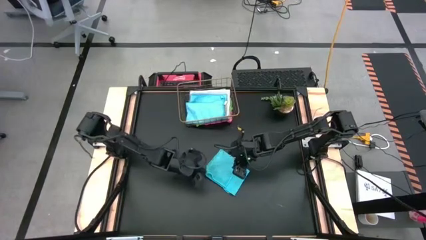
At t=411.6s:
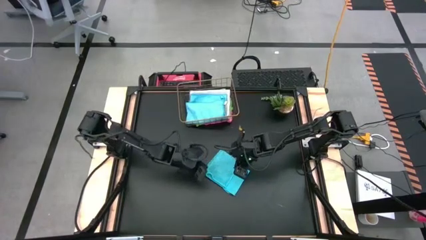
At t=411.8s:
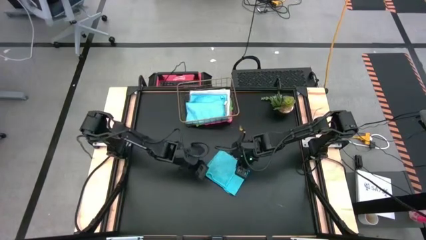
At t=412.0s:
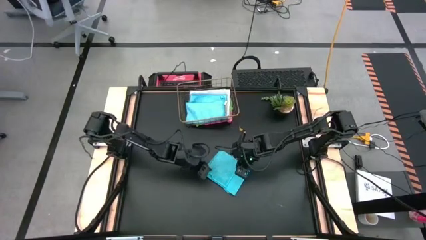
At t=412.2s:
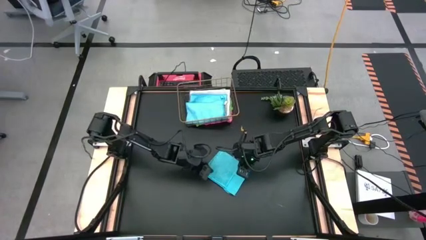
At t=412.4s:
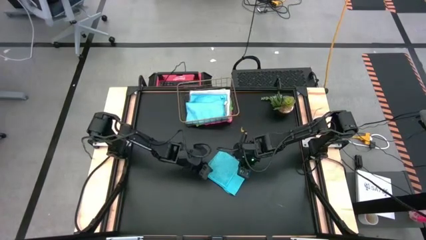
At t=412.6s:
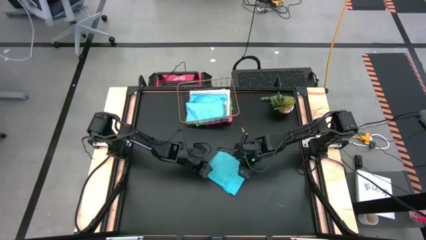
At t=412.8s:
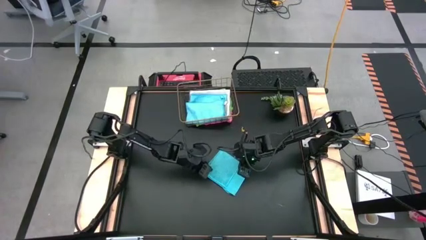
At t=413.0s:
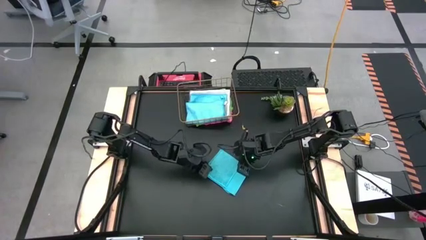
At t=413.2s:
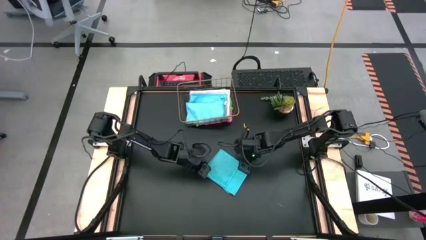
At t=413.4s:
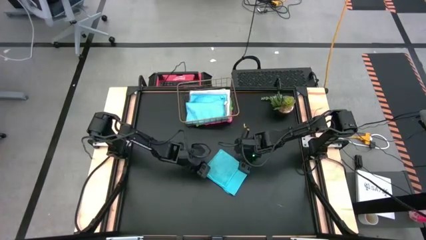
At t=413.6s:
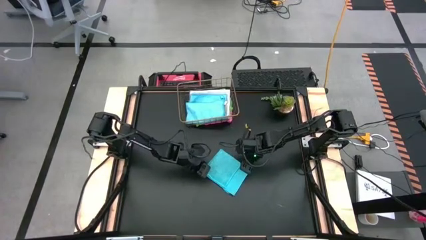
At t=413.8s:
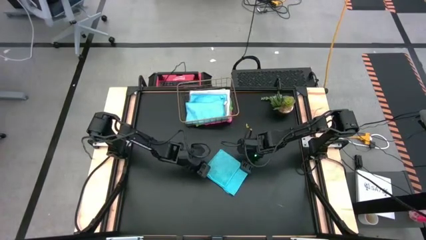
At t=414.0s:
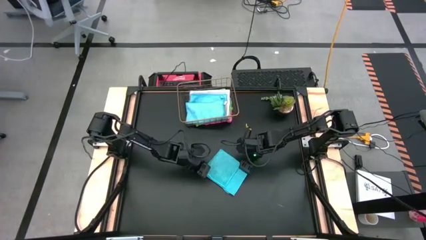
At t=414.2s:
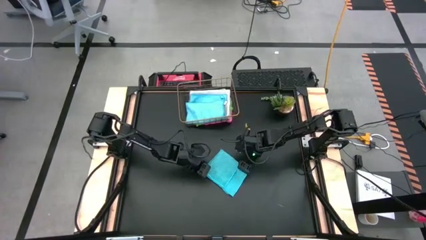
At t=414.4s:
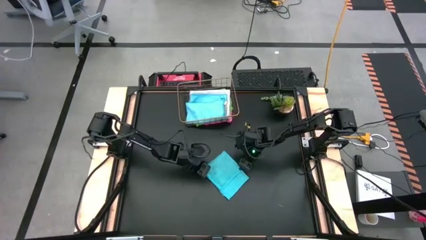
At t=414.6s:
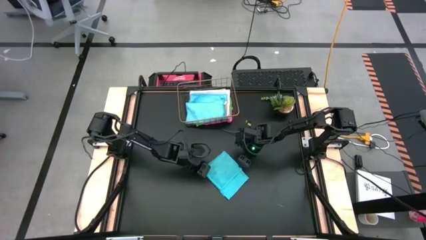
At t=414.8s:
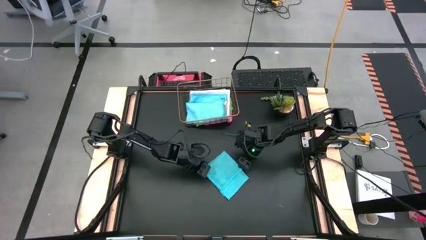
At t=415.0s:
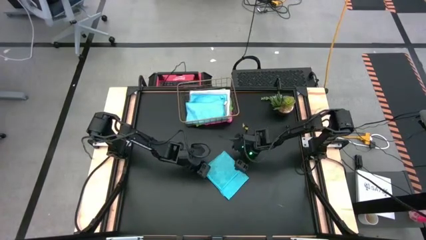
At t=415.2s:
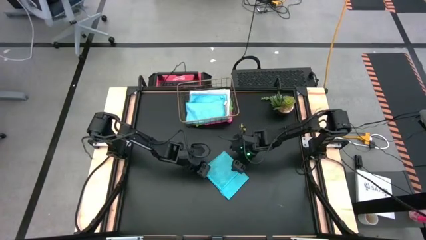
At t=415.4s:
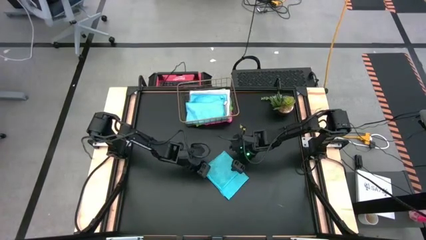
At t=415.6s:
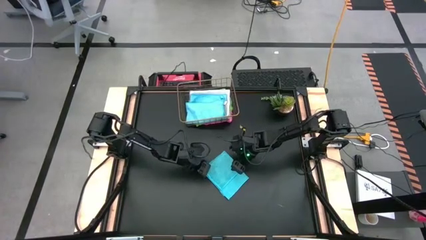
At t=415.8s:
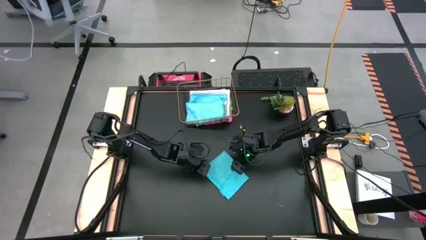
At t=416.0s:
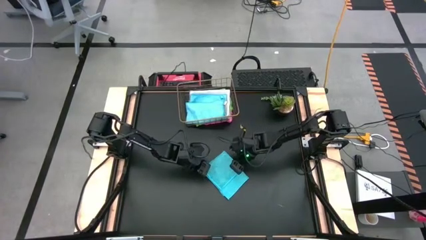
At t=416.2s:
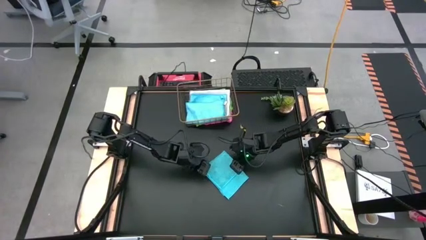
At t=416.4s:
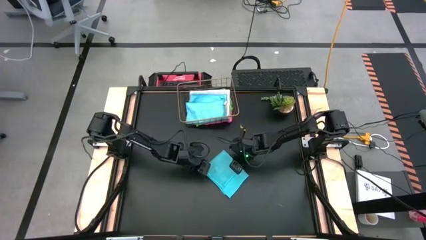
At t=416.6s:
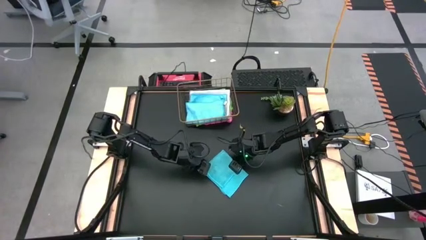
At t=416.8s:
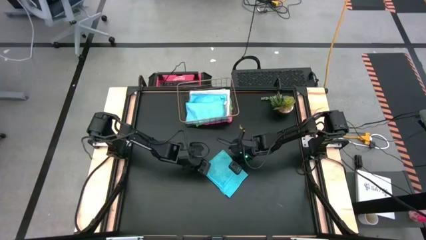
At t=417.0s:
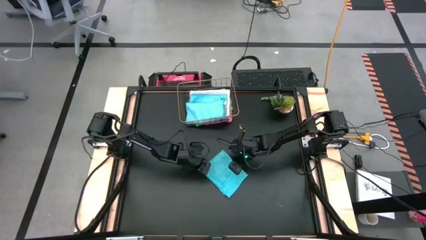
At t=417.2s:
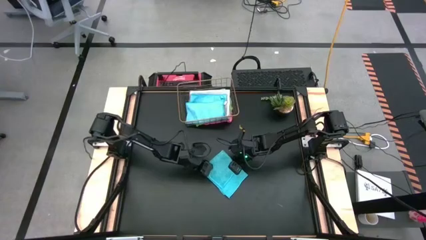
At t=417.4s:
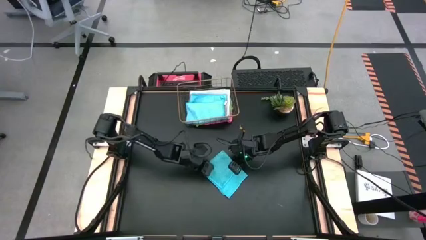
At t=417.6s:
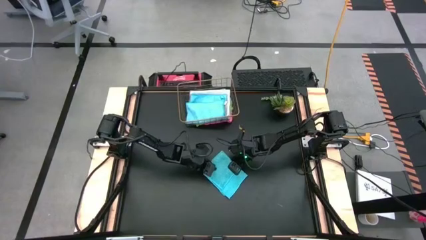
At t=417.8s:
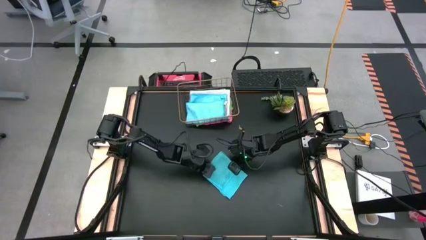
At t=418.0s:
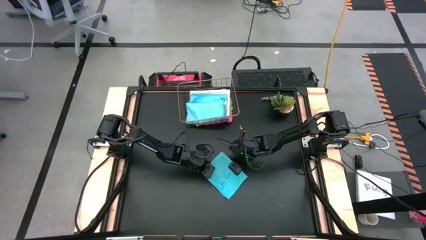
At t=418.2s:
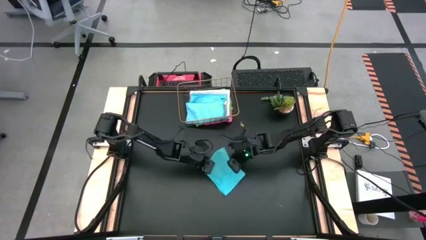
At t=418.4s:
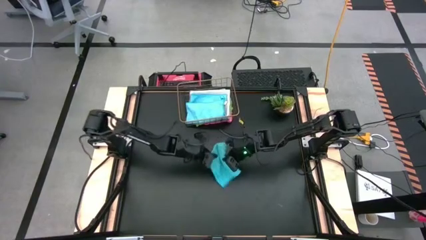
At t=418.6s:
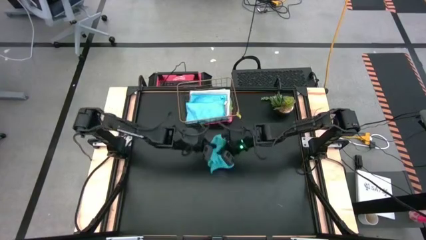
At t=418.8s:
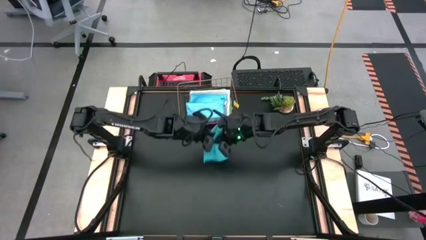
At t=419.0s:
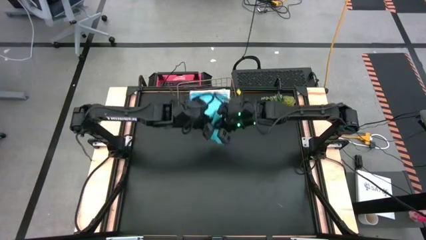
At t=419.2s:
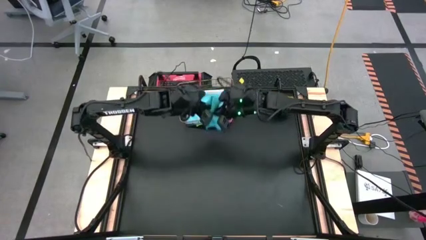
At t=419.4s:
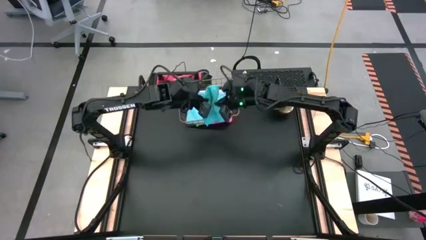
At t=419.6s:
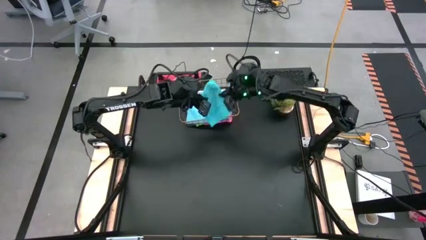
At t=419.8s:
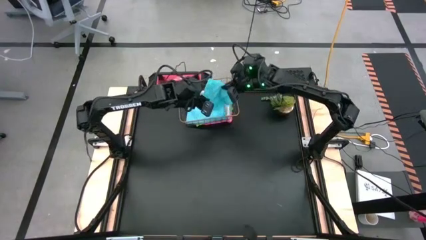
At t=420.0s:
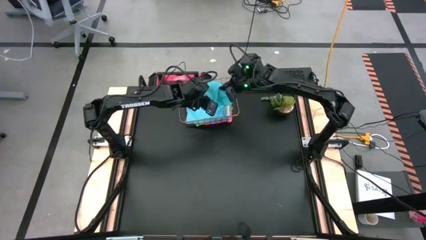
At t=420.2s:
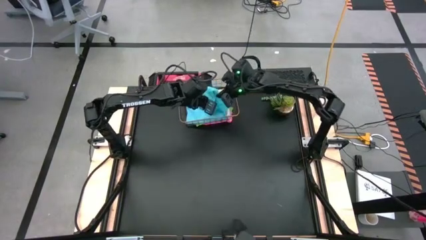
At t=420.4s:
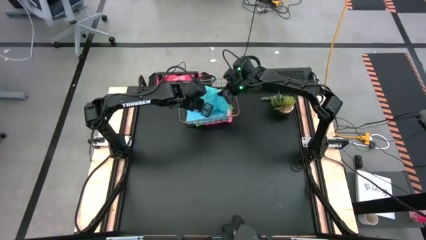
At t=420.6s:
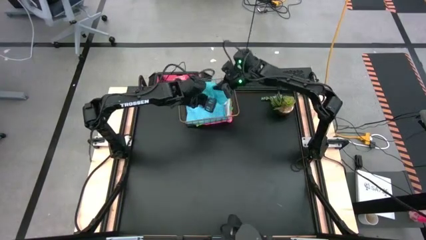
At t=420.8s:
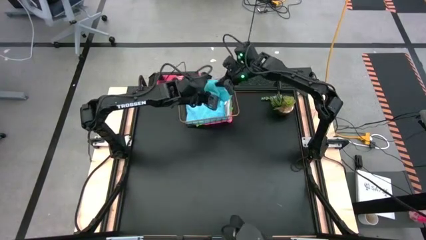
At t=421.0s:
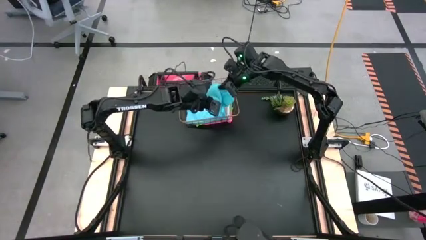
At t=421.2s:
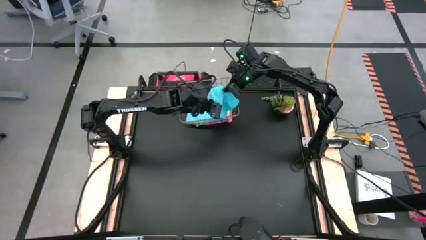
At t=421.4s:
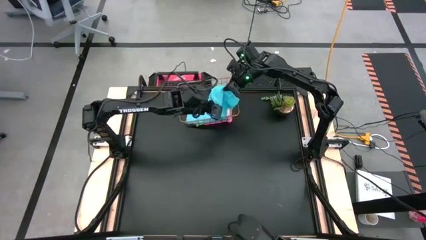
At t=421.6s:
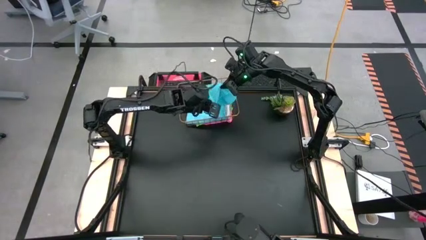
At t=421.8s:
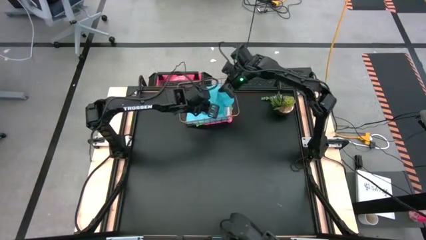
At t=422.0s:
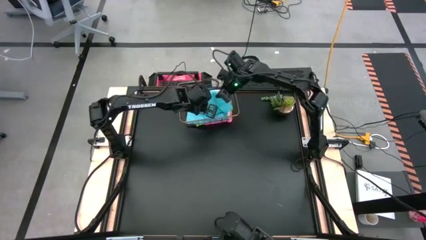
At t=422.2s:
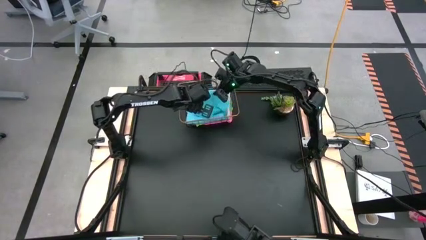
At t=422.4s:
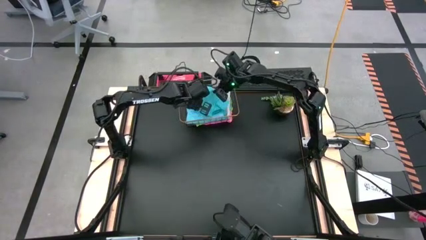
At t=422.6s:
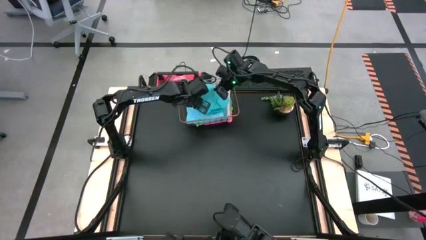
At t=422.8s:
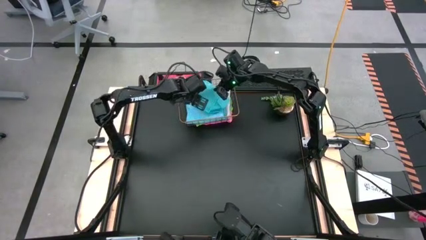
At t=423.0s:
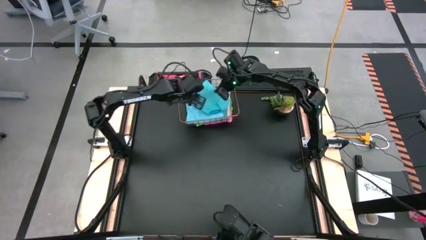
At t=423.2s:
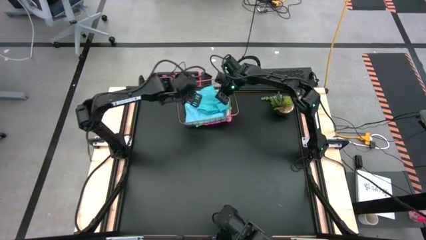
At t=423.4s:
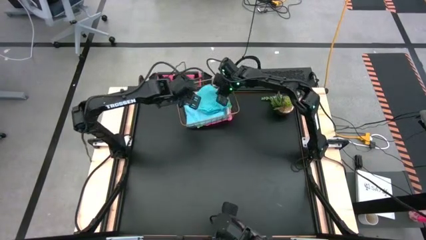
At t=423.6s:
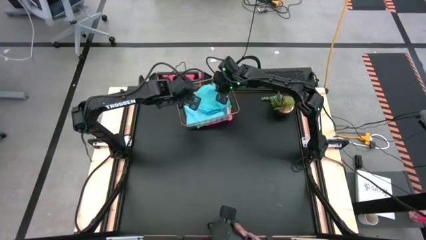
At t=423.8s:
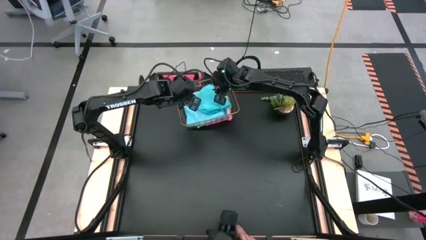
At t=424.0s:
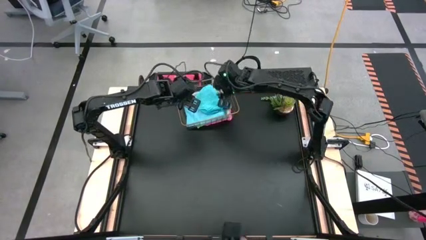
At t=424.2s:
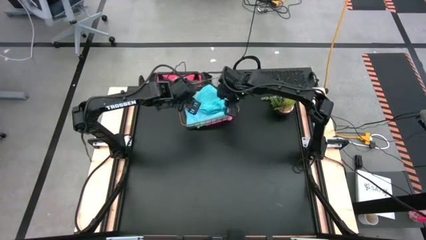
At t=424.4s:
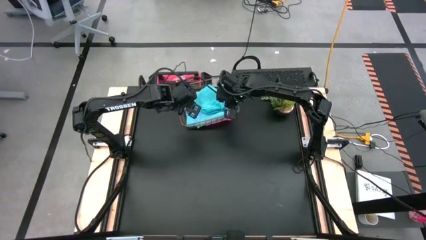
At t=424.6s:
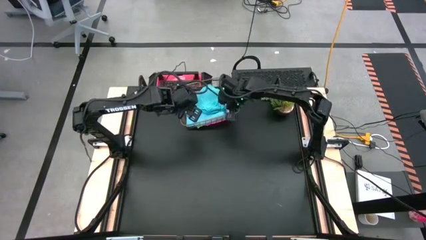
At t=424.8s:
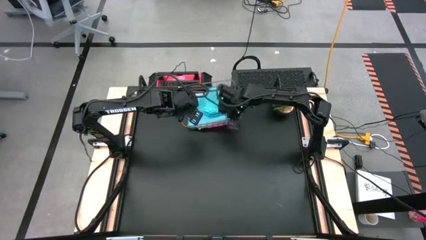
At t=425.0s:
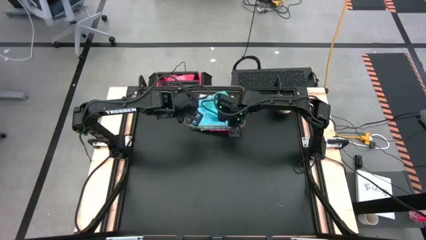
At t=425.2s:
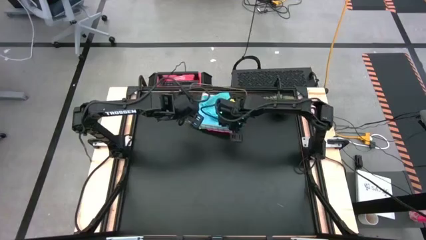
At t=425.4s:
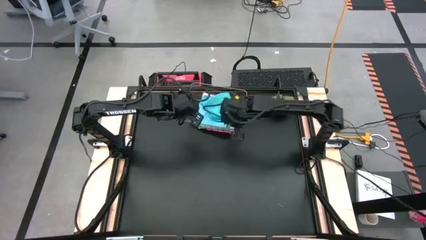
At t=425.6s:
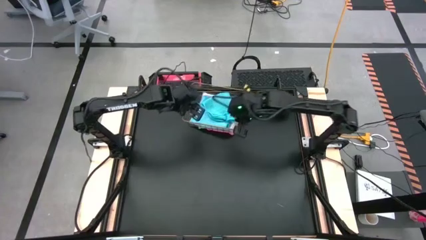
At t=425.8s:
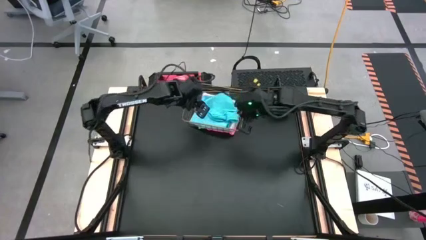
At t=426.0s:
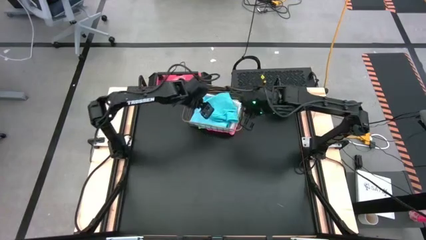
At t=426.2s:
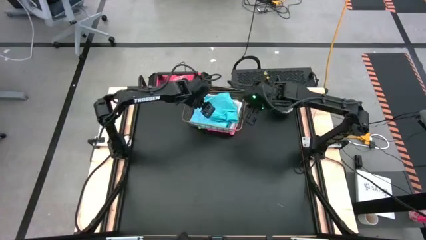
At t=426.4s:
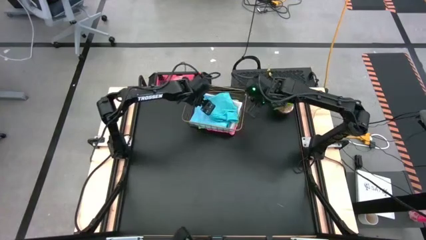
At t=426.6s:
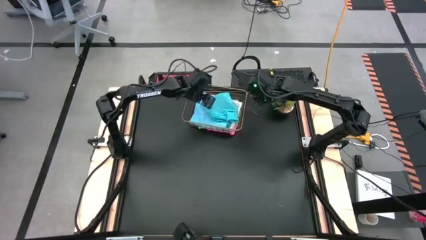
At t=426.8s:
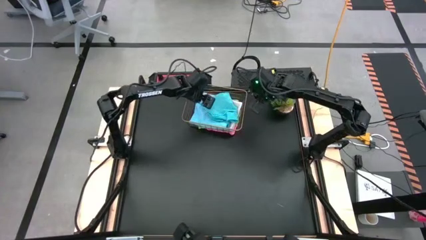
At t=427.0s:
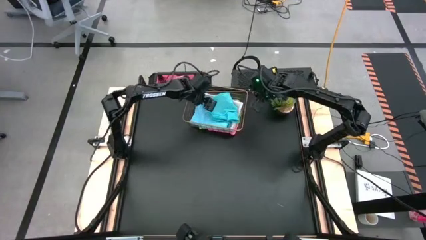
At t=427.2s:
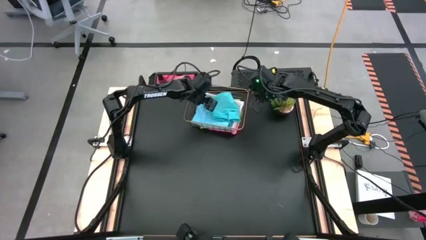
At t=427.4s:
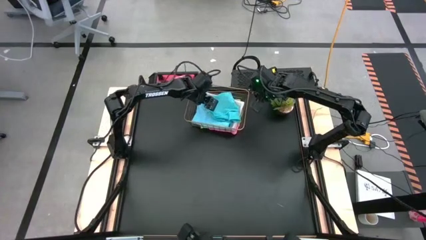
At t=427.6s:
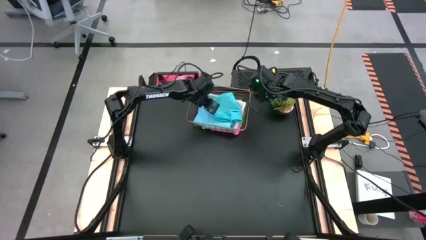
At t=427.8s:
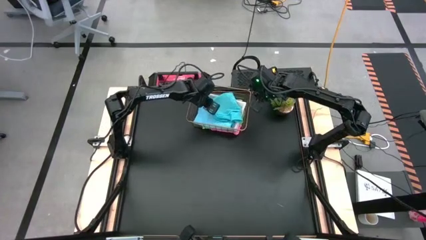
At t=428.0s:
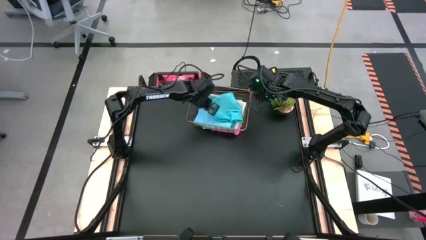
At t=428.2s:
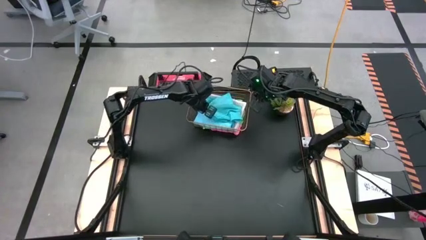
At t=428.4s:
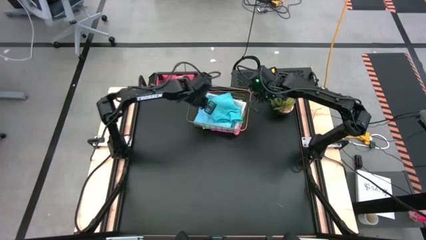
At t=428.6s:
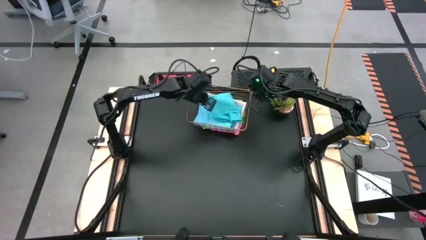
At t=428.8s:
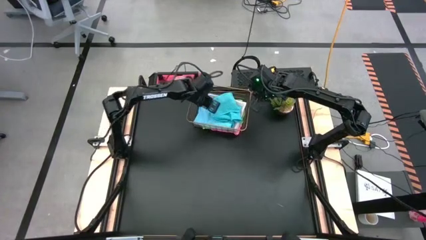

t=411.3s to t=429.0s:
Task: Fold microfiber towels
Stack the folded light blue microfiber cloth on top of the folded light blue microfiber cloth in the wire basket
